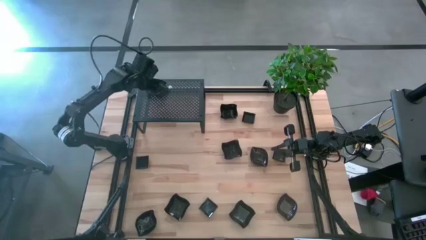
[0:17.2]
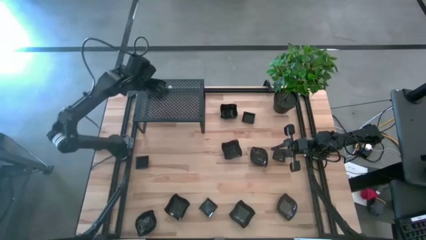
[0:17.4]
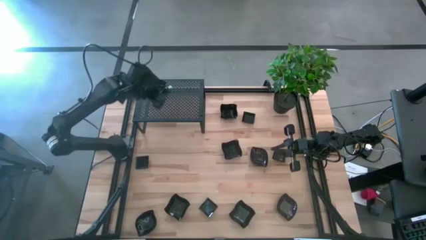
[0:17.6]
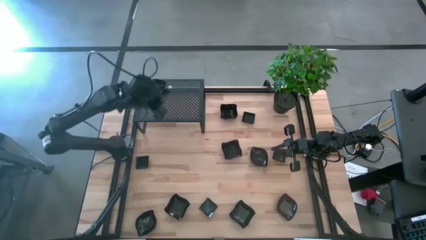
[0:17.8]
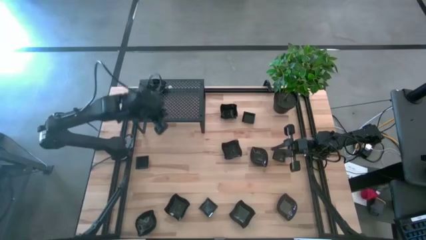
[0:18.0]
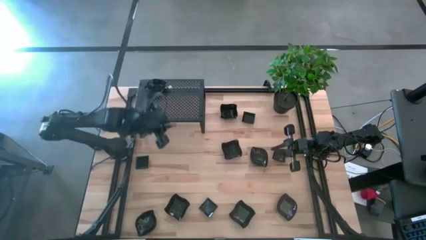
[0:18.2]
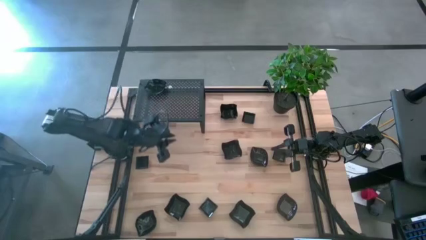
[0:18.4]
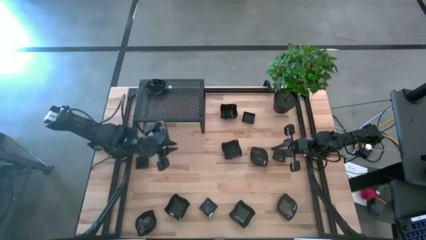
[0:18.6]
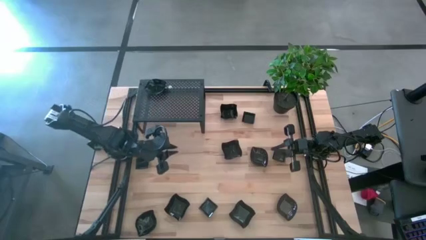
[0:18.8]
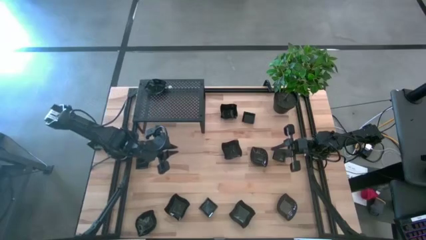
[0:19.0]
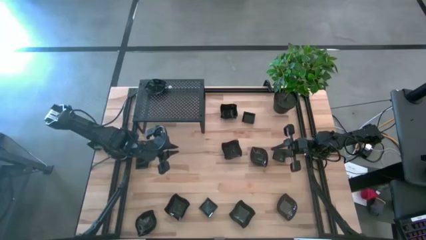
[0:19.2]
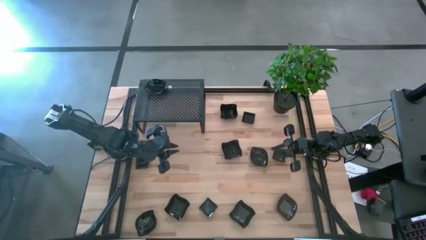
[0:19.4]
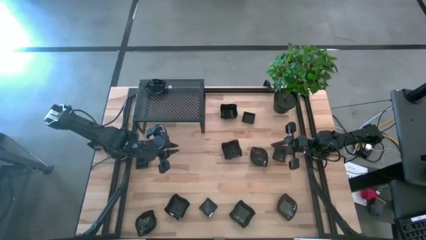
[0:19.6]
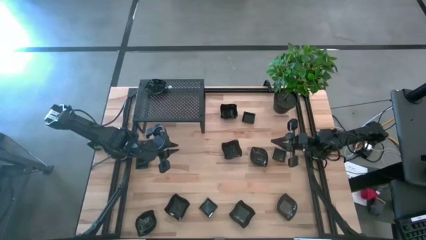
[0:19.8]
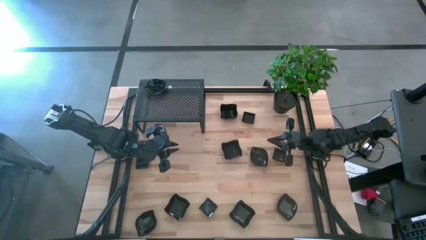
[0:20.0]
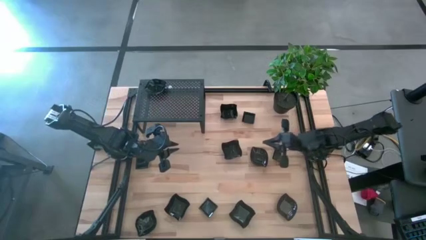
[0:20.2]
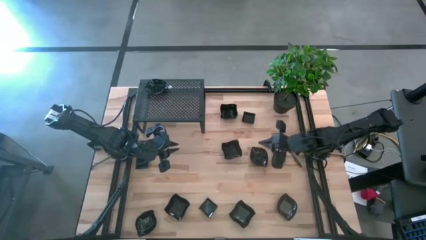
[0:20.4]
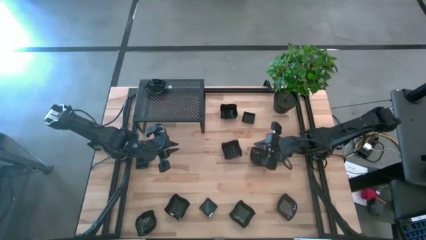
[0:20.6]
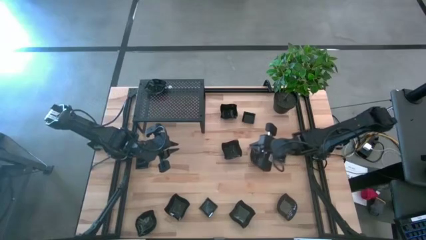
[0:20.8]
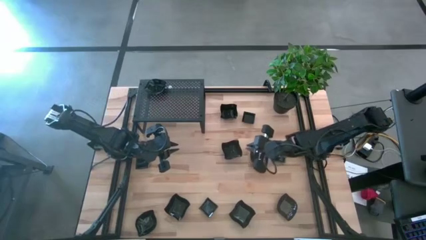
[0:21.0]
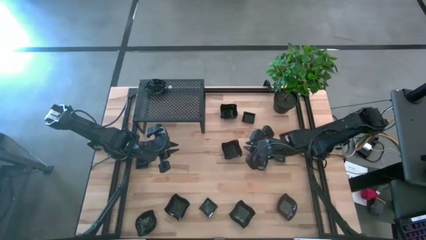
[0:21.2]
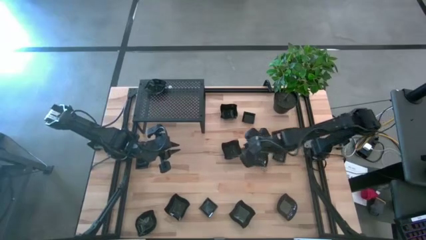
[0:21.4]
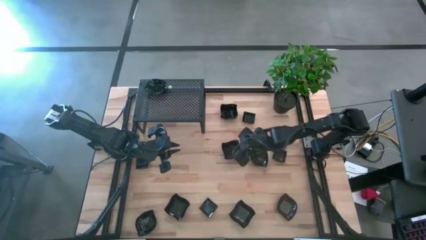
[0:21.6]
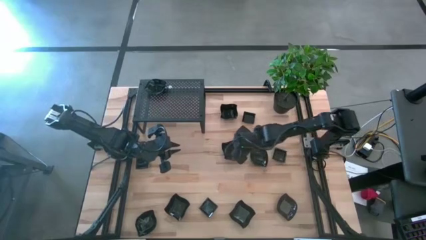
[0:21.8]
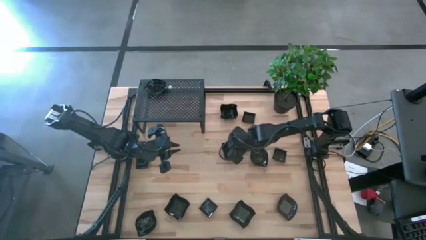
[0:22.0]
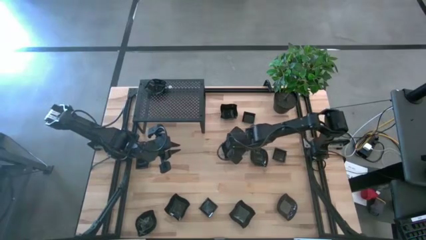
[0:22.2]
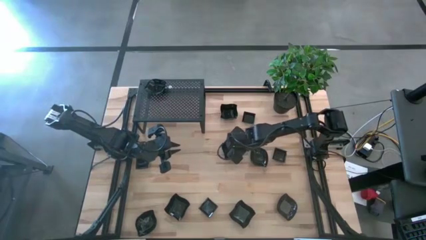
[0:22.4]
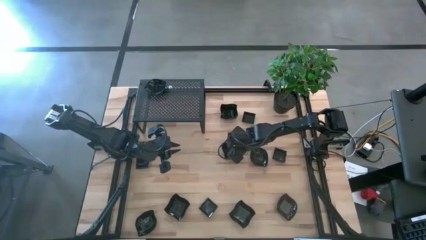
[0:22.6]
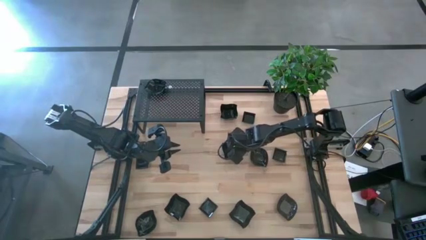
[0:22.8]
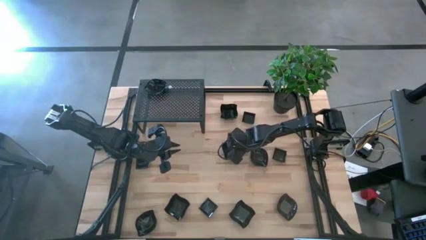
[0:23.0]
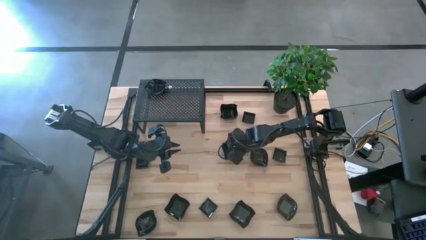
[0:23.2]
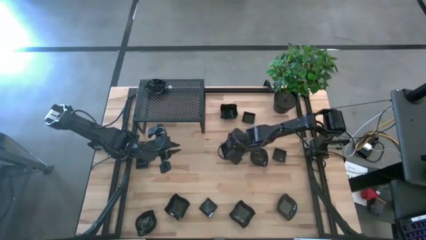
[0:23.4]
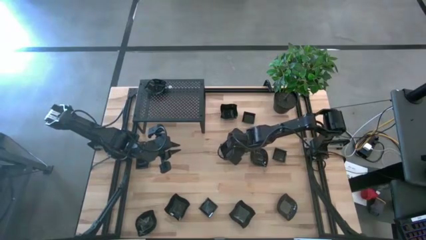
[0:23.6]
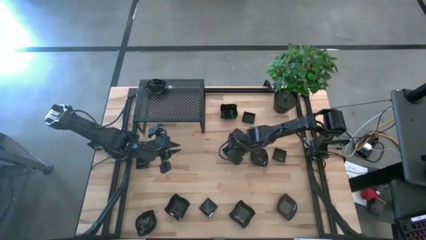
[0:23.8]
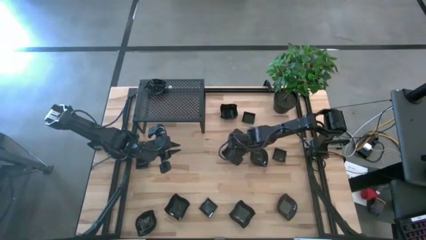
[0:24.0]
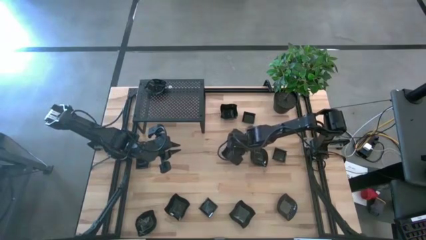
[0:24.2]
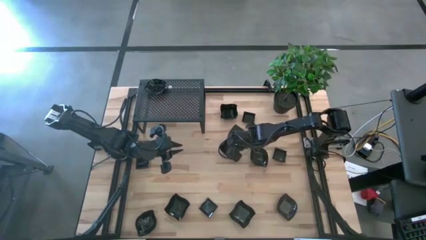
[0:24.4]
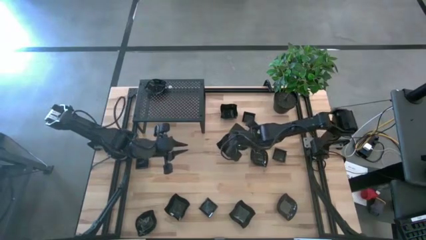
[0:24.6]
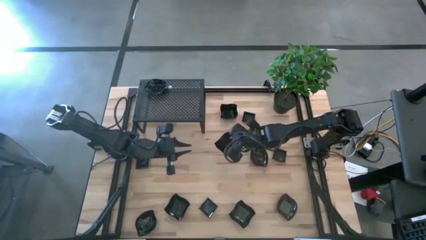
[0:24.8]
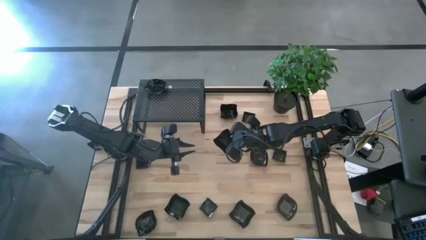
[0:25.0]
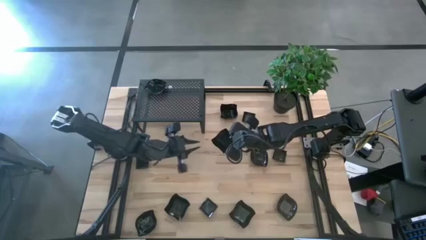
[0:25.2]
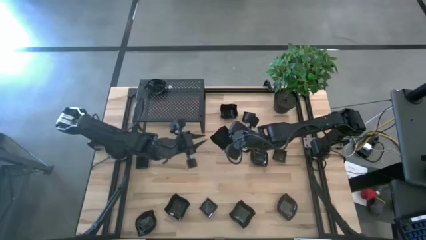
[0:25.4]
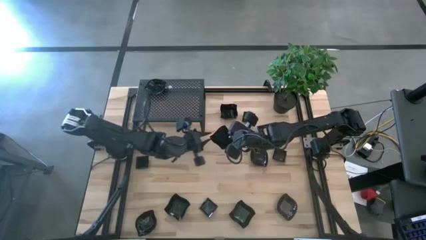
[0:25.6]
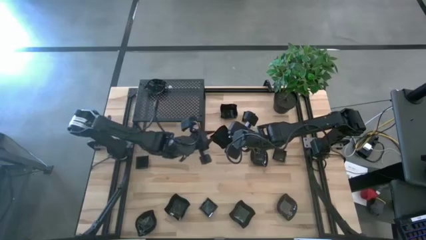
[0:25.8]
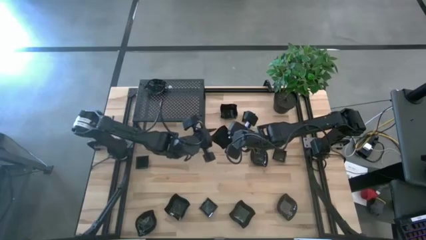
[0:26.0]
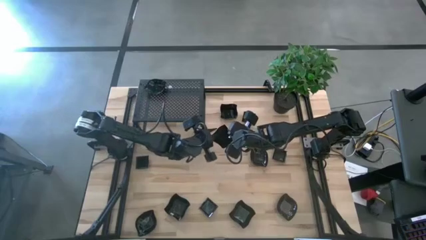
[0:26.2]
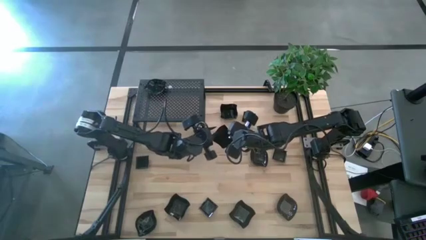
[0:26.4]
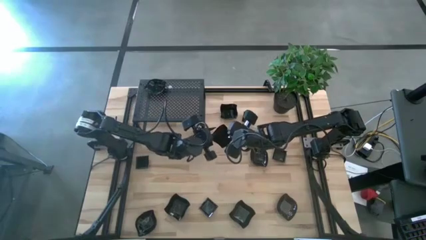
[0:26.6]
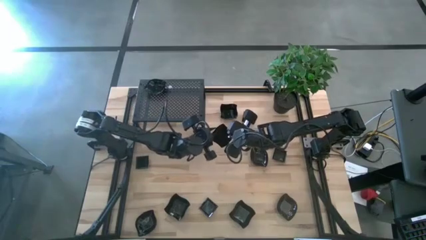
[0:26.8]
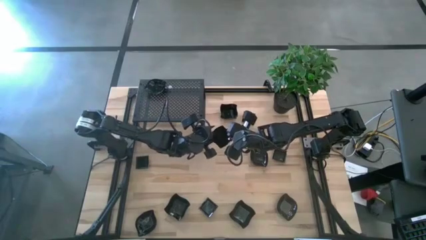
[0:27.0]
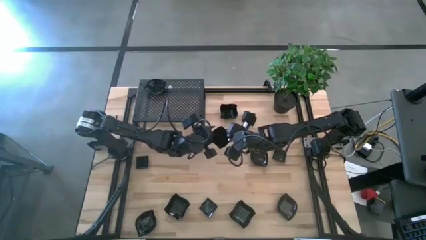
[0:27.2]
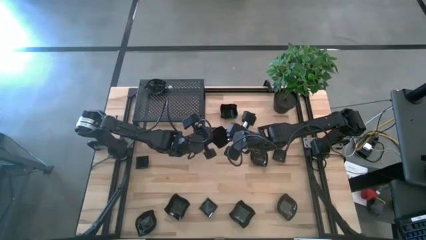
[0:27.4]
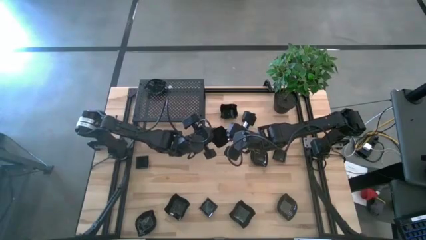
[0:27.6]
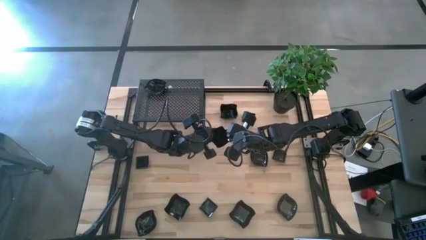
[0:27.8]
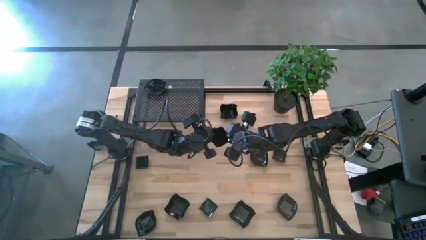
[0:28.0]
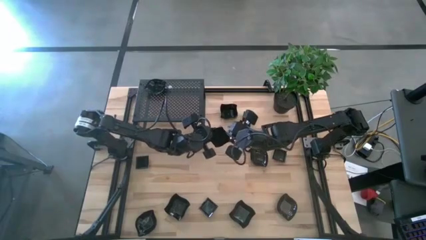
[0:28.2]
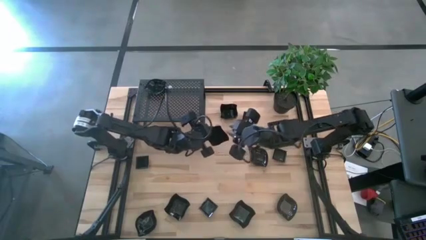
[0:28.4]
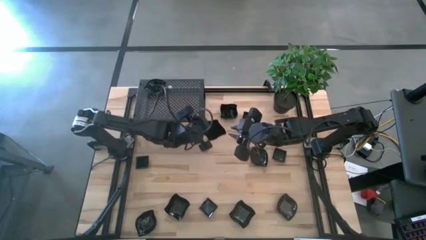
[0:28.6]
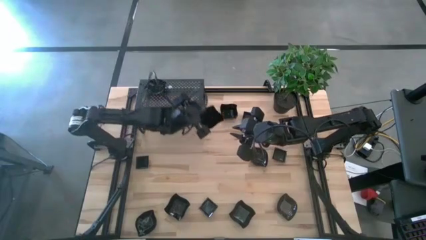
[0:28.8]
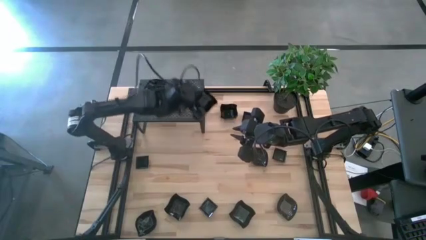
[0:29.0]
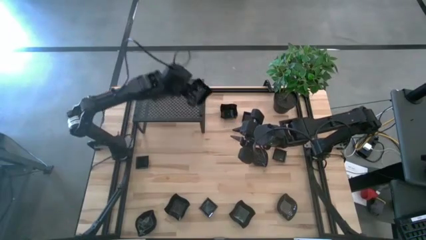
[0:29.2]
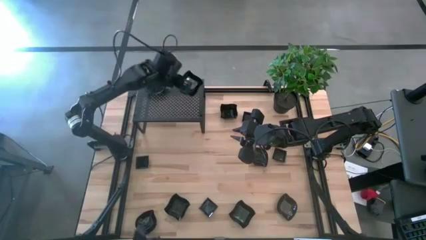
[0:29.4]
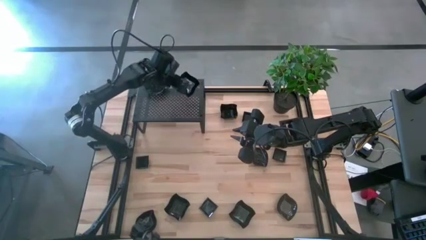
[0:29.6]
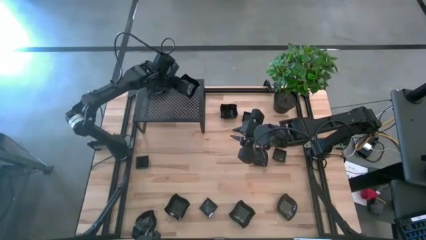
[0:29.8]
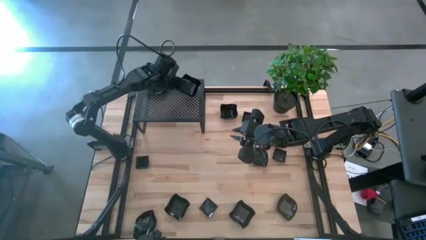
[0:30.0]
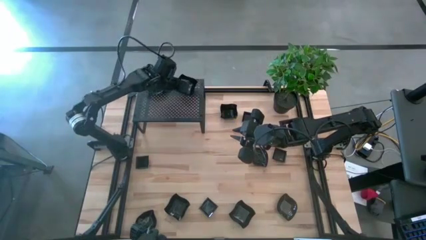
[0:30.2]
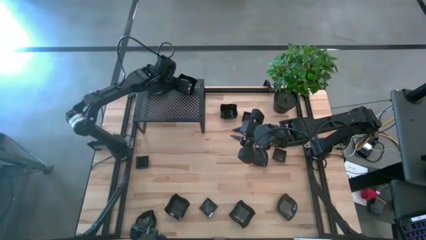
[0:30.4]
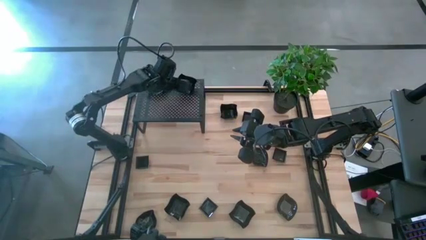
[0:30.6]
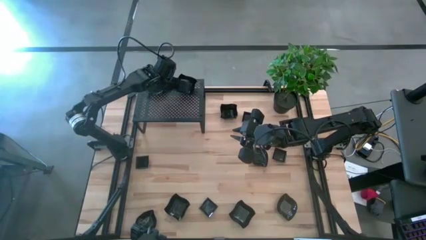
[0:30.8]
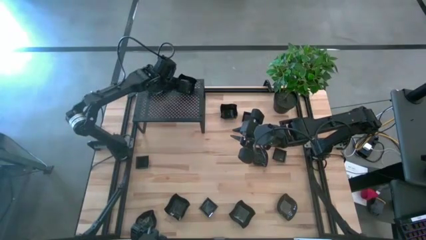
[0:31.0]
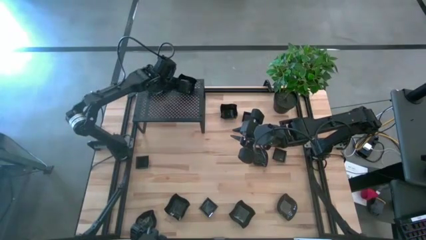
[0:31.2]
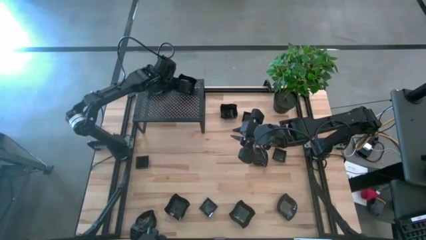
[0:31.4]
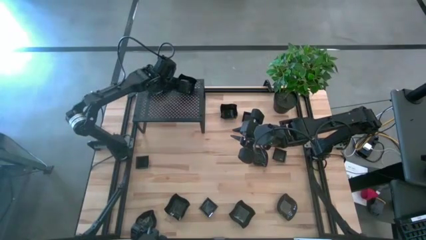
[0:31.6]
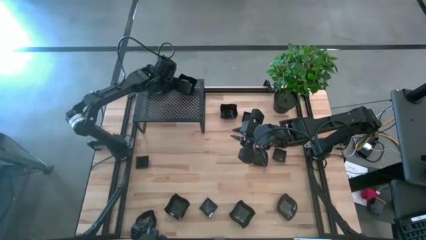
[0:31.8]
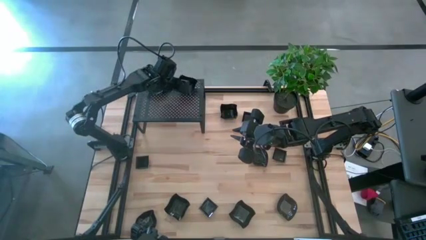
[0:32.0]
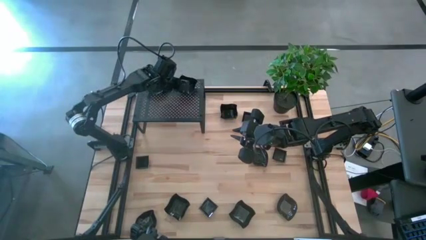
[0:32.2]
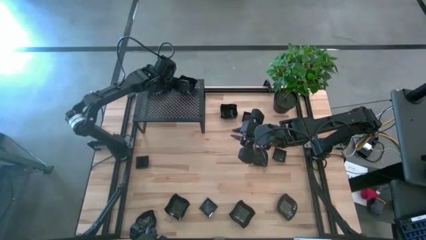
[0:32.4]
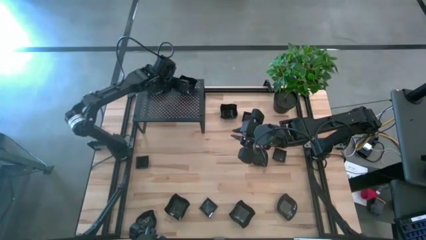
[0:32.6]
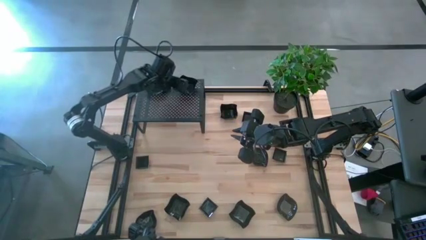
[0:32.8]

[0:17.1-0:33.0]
Task: Pick & Place Mini shaped plates
Put the distorted square plate on the shelf
